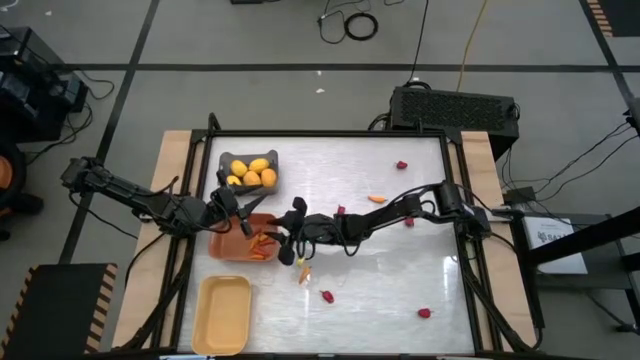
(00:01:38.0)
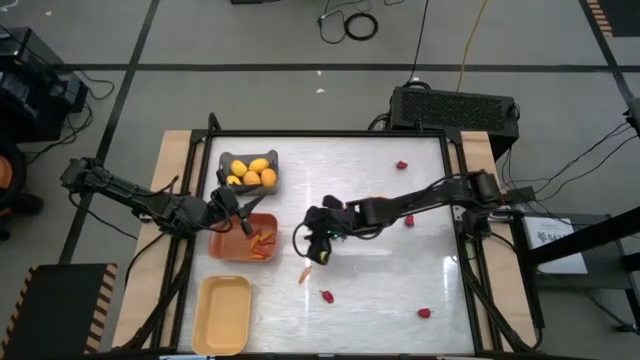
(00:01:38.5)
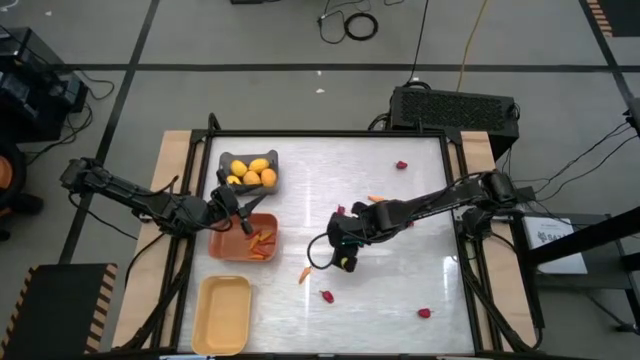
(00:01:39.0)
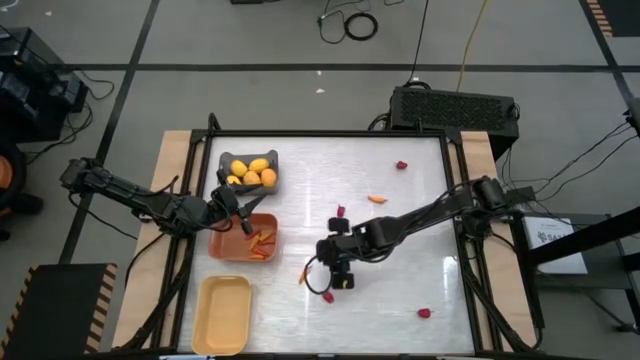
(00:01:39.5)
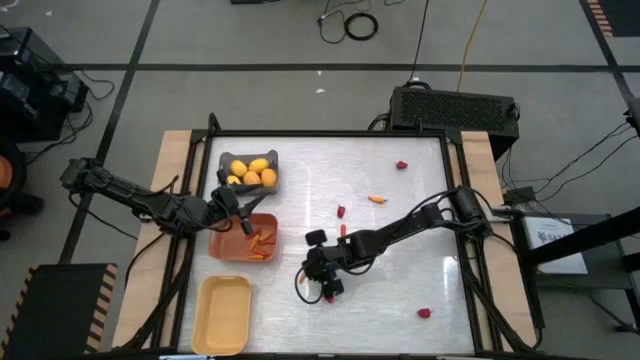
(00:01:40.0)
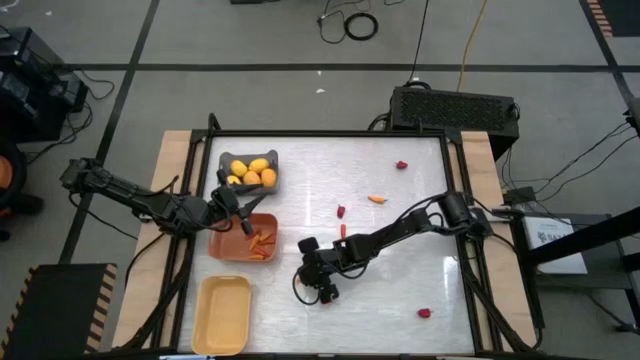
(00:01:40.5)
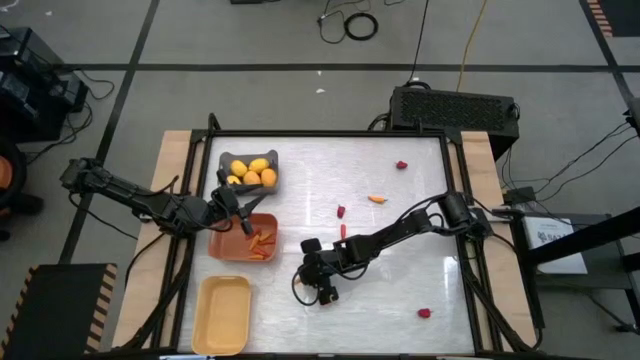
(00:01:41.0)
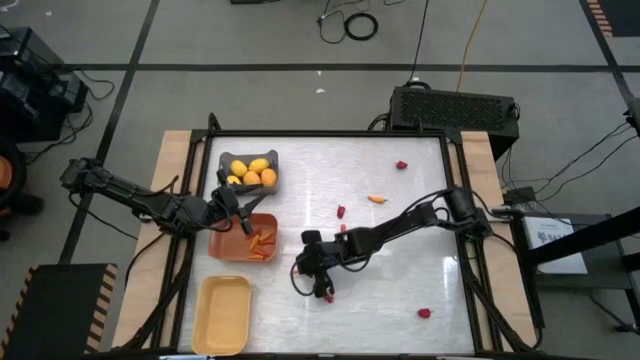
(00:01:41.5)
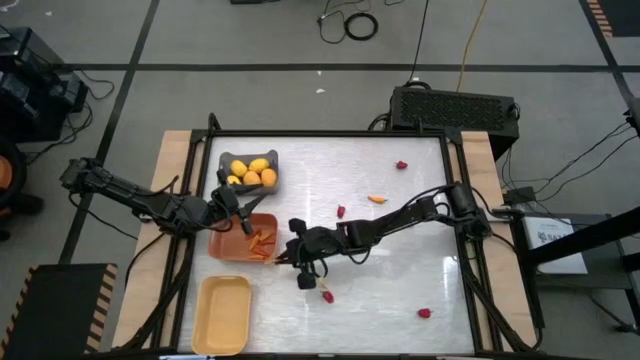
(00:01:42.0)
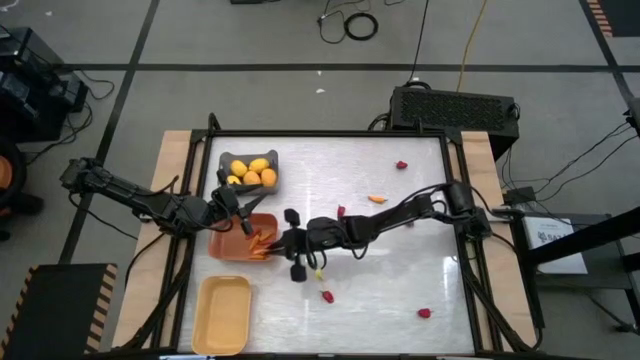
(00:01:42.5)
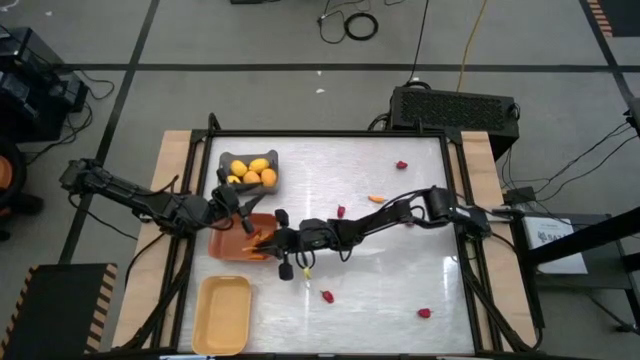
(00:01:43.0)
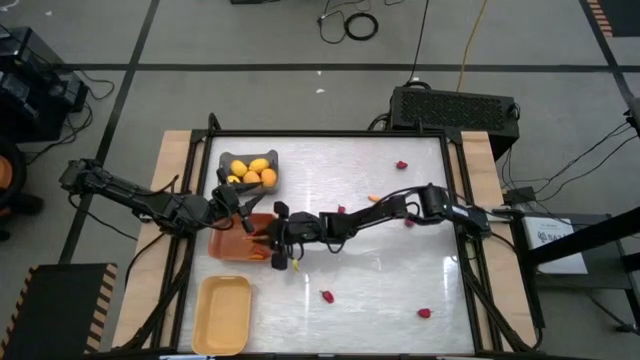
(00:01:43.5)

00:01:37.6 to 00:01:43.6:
Task: Sort produce into baskets
Put the yellow chili pepper into the orange bin

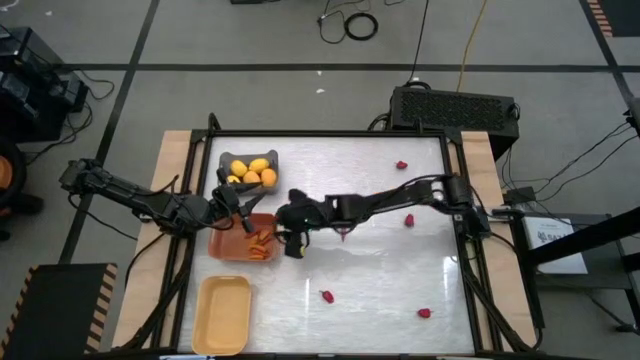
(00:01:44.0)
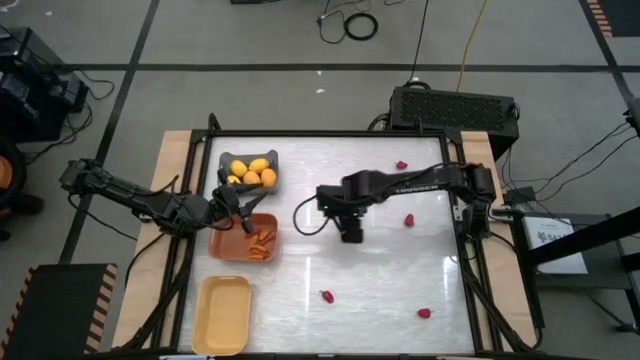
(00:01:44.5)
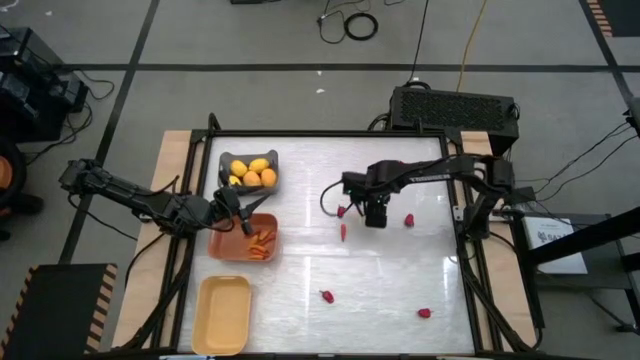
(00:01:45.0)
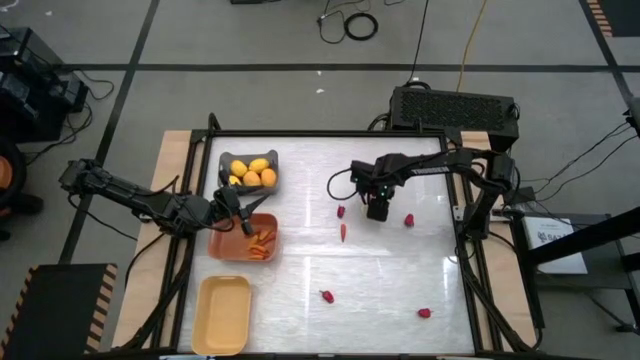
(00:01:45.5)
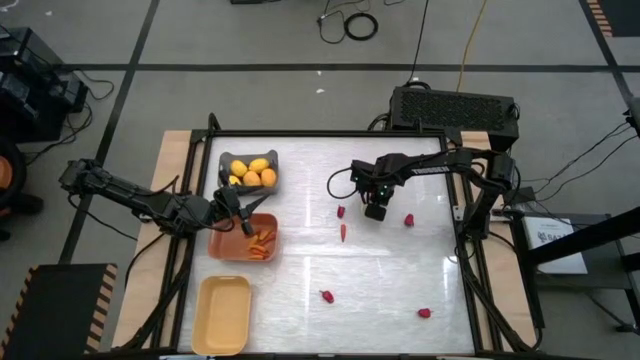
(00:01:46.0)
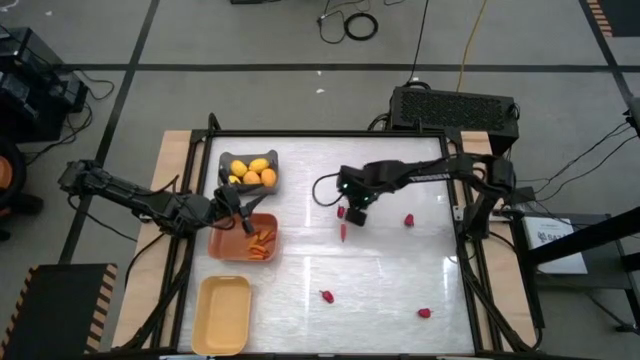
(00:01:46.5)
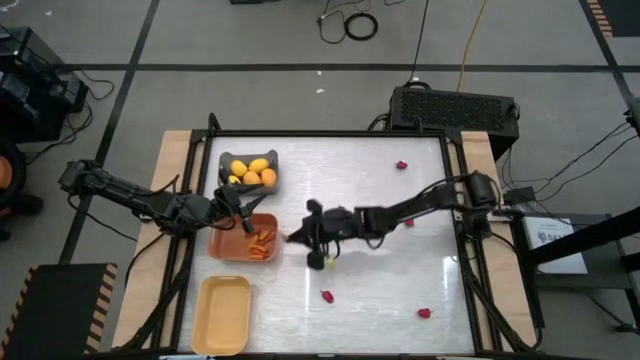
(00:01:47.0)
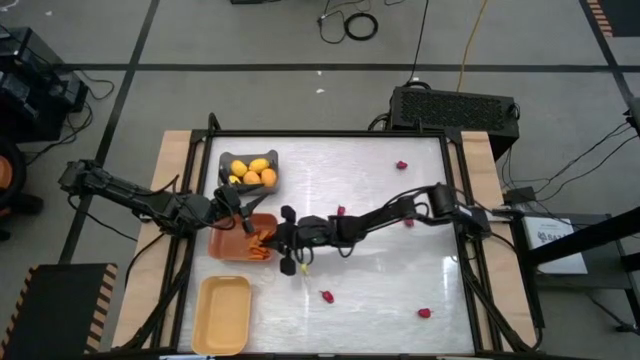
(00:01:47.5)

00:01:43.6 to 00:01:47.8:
Put the yellow chili pepper into the orange bin

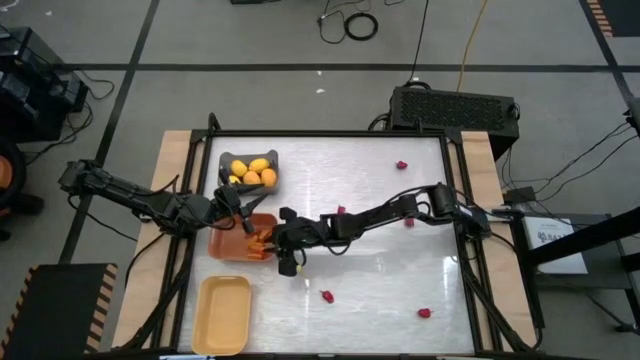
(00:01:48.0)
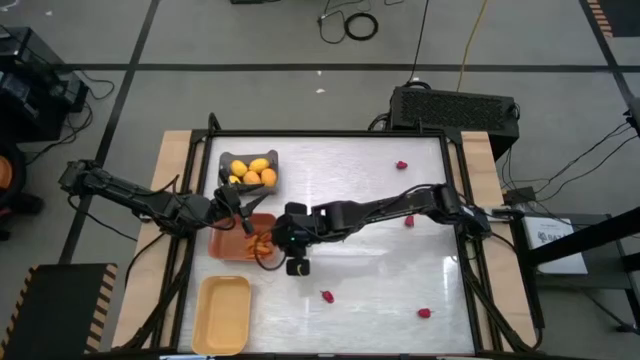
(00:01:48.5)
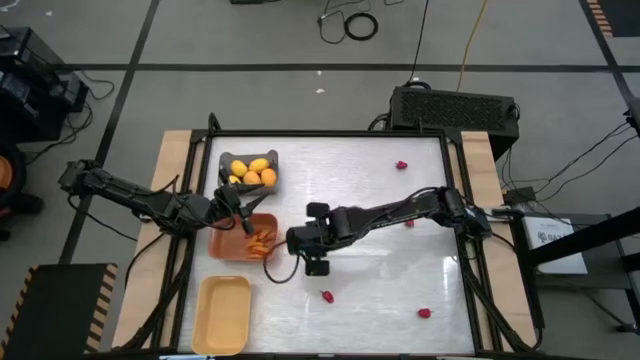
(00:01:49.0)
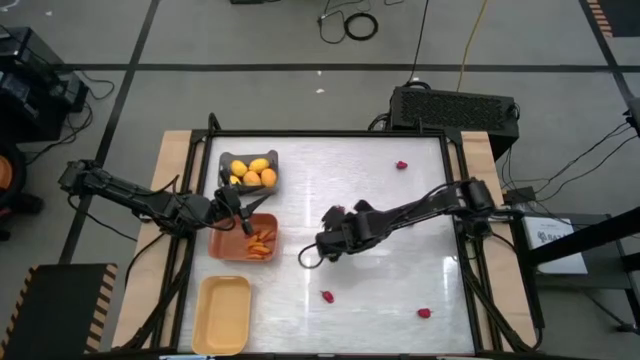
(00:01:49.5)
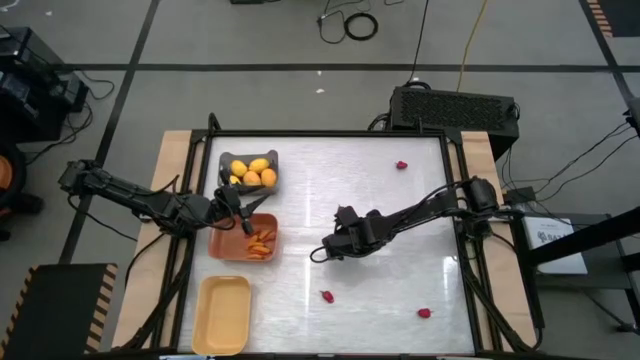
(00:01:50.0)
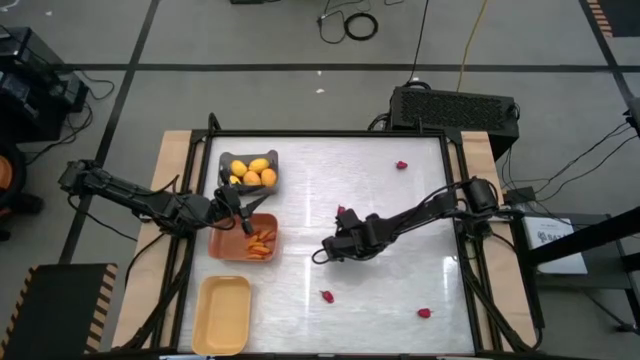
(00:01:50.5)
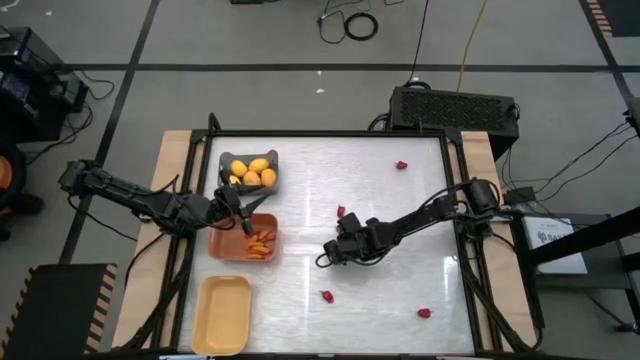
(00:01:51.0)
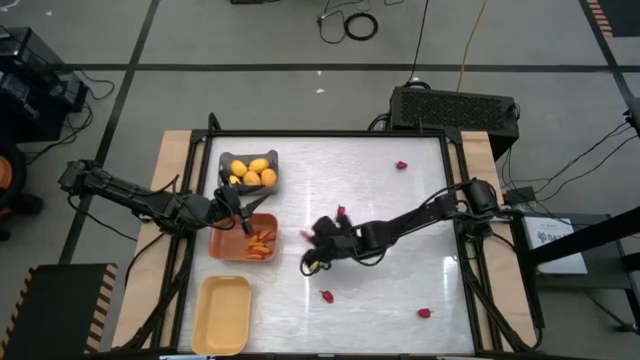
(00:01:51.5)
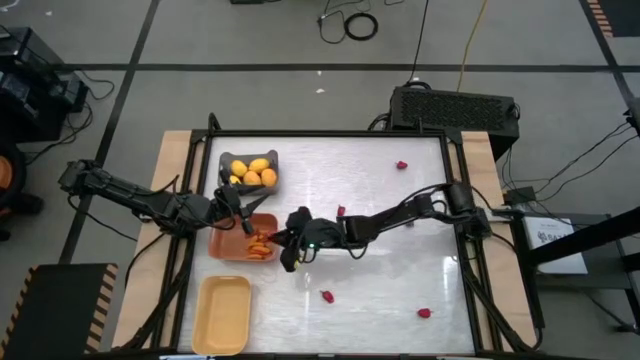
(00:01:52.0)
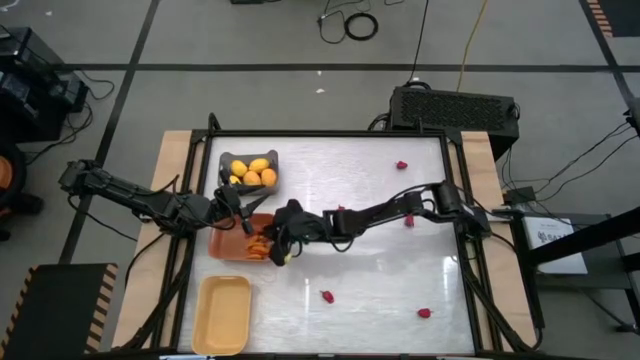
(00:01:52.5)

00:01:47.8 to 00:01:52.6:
Put the orange chili pepper into the orange bin

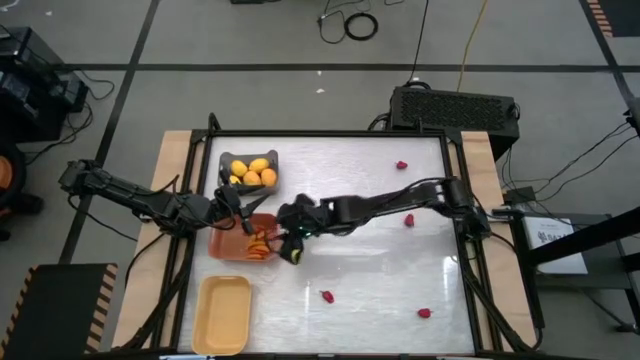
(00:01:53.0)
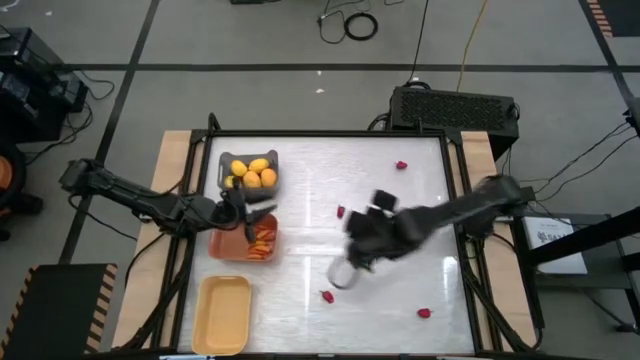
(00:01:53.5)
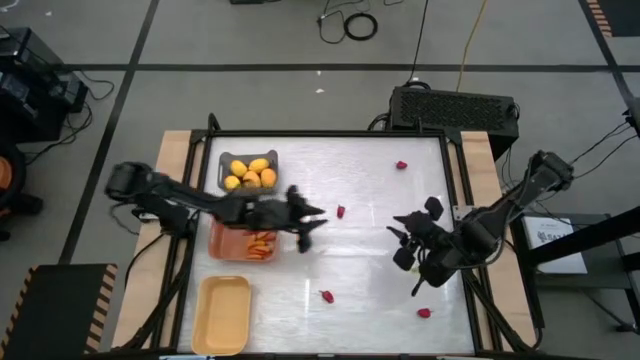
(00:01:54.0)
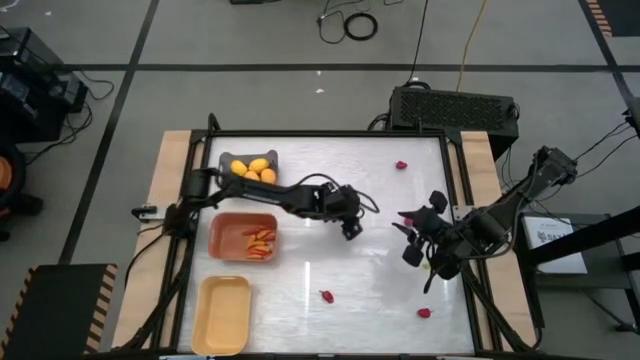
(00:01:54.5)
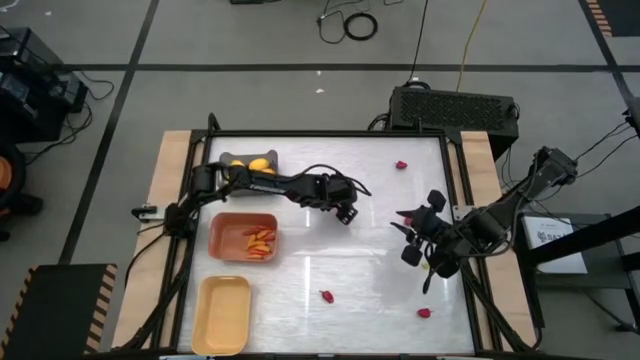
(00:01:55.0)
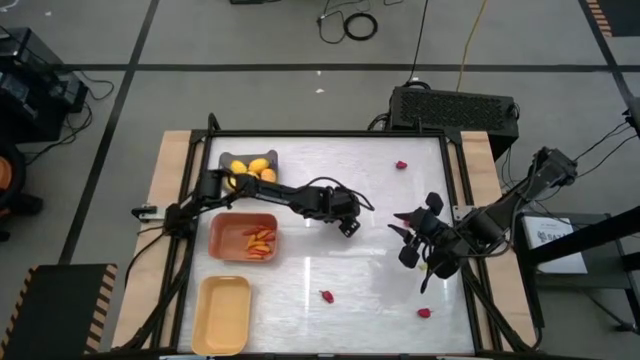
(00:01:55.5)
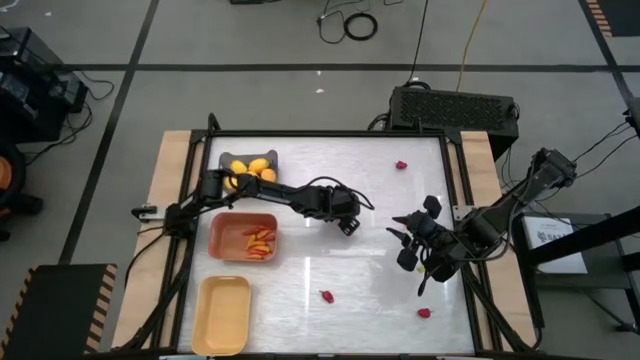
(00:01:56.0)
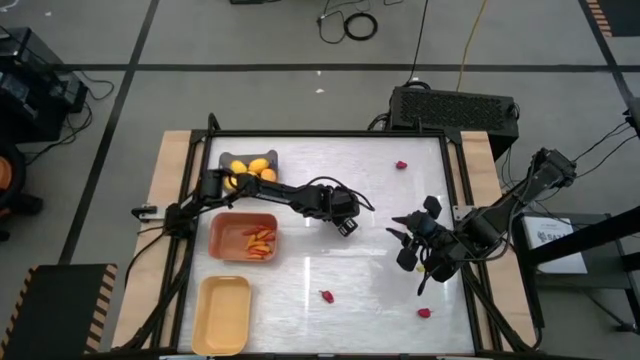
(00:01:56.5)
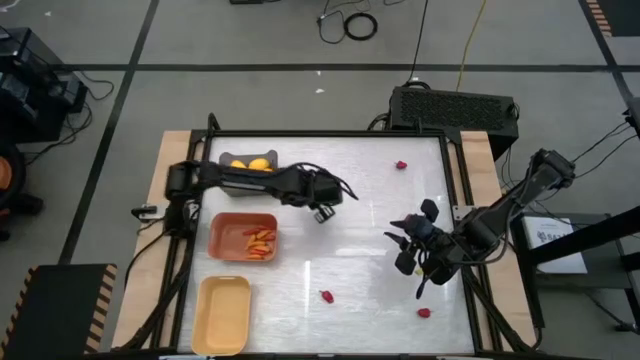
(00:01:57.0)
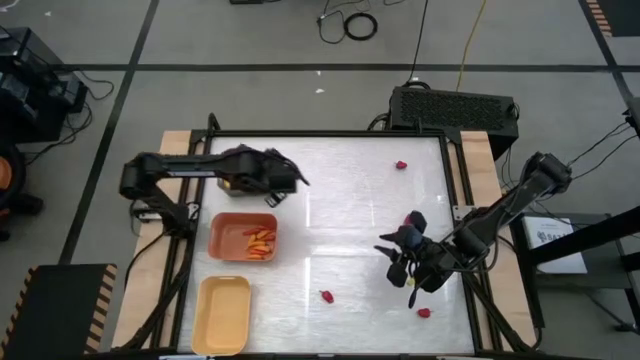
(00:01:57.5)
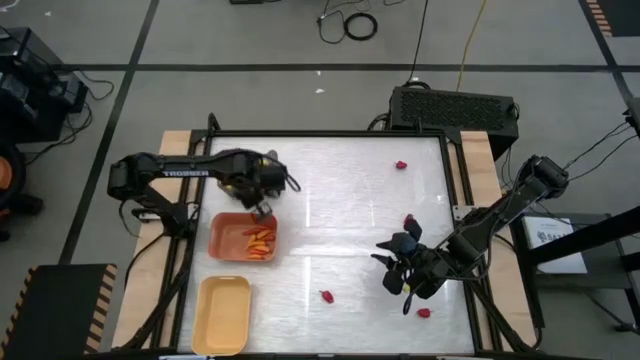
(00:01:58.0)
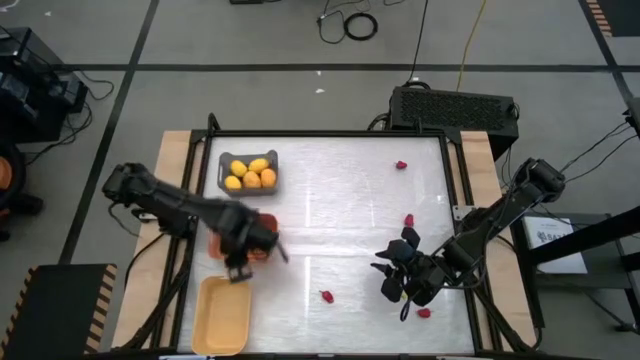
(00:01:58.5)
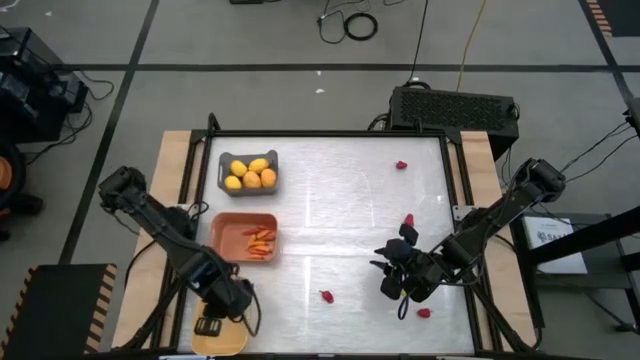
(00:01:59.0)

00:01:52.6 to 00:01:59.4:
Put the red chili pepper into the yellow bin
